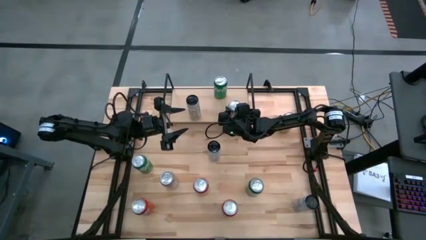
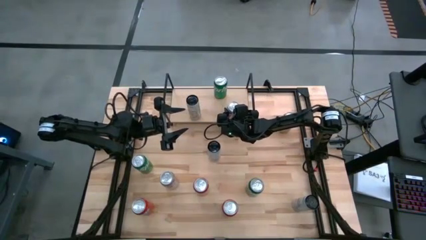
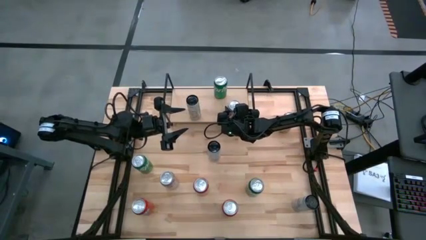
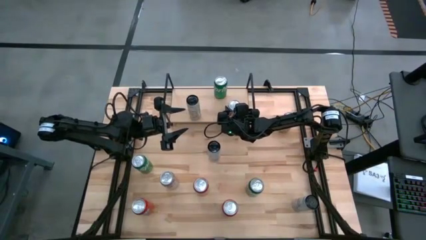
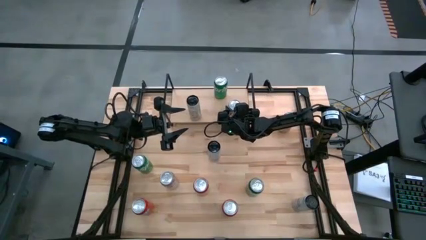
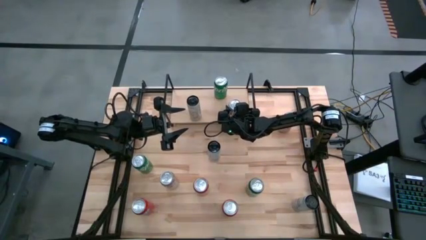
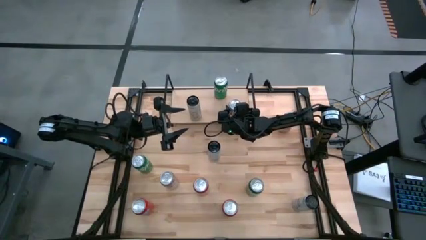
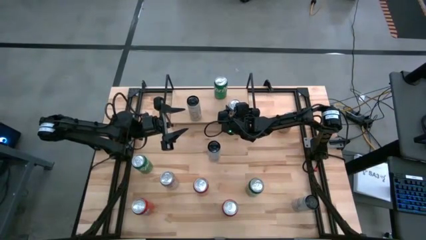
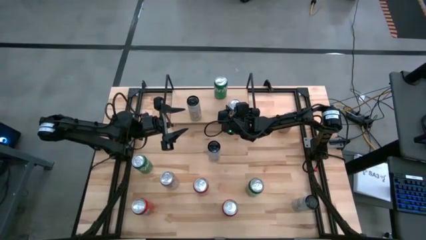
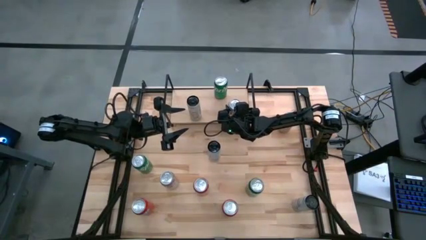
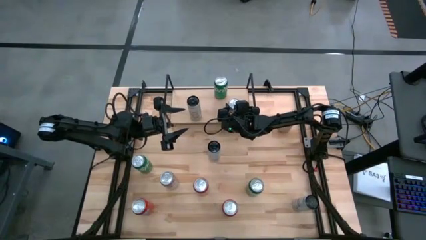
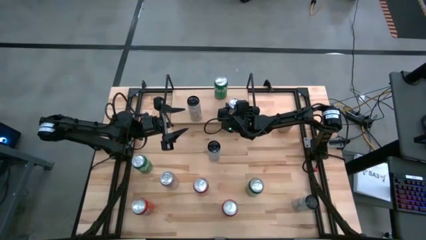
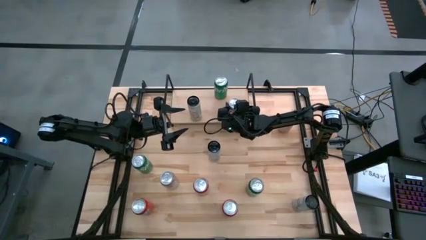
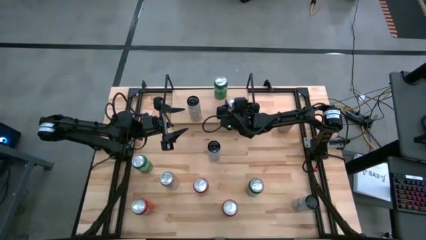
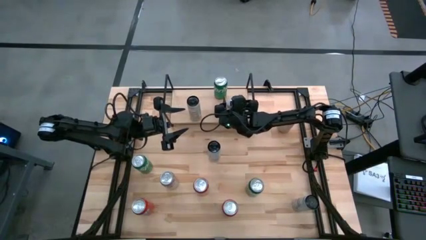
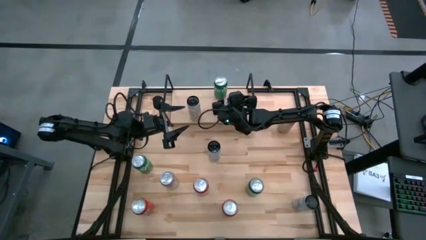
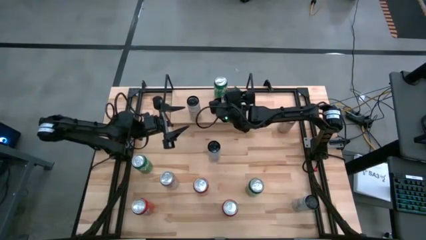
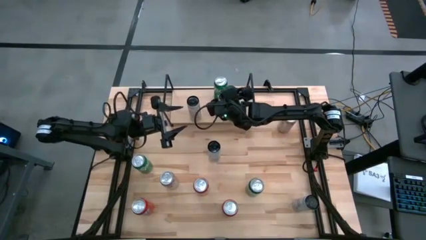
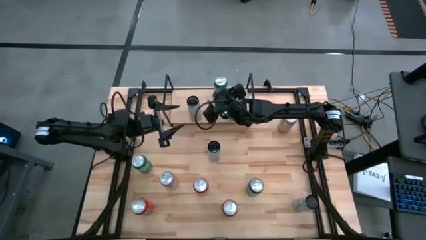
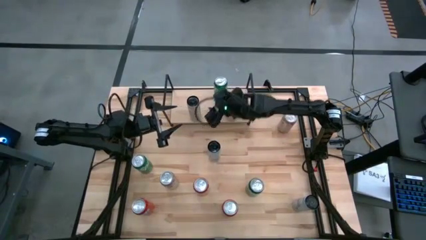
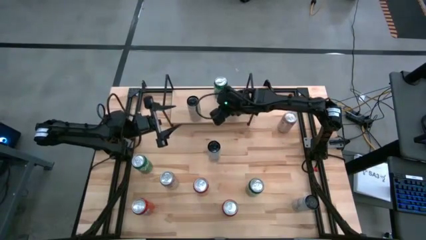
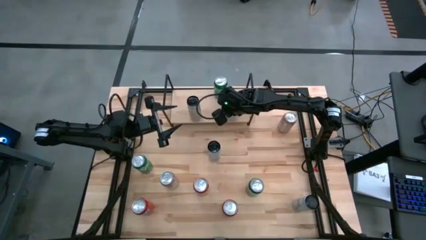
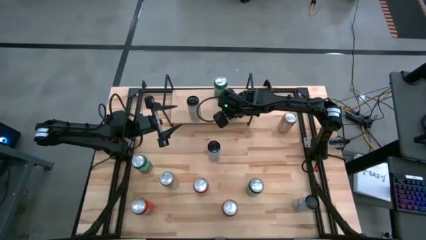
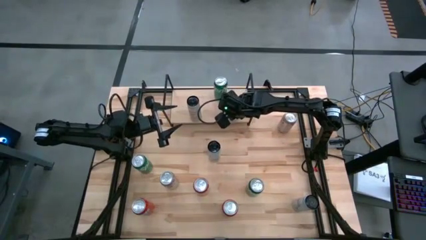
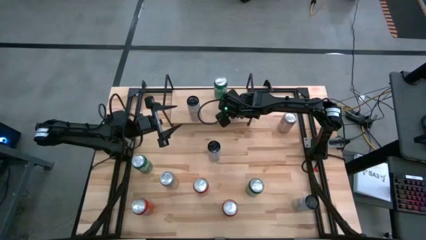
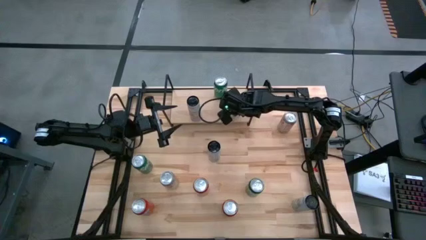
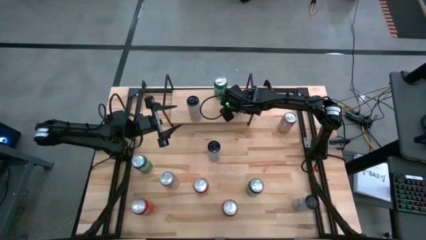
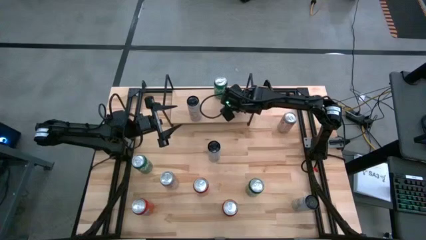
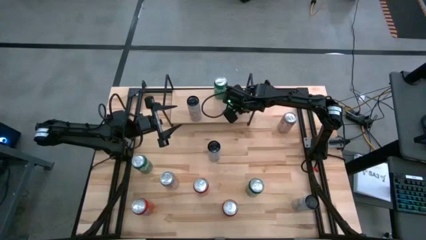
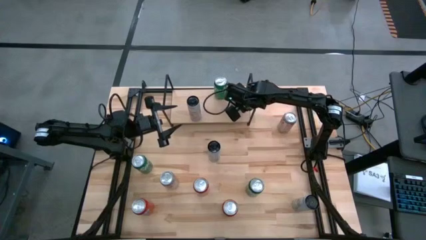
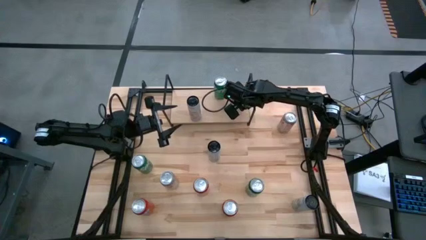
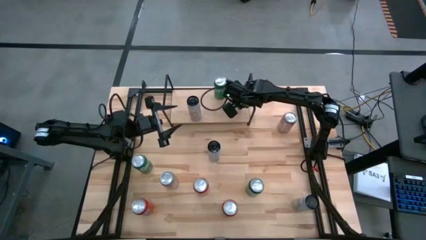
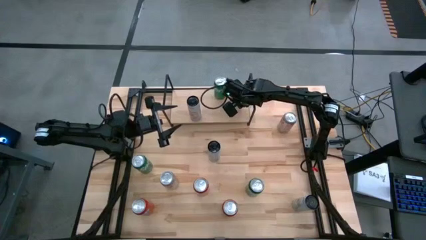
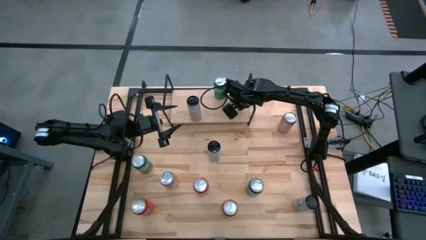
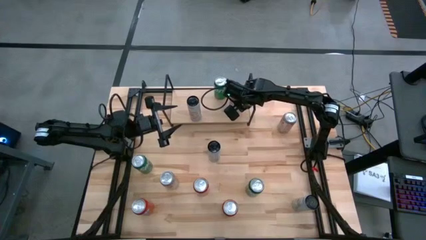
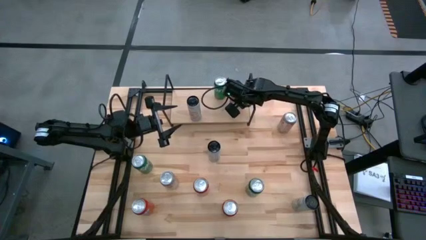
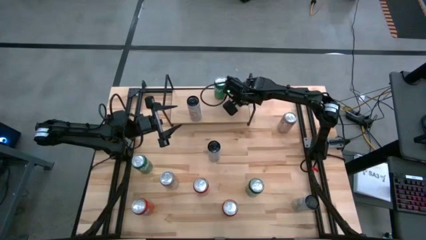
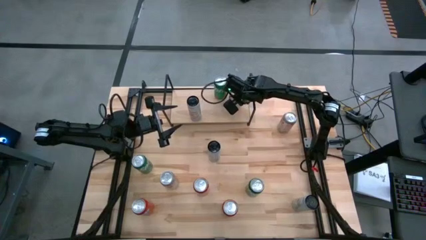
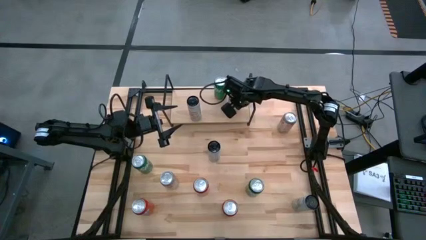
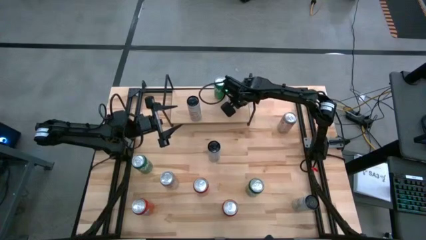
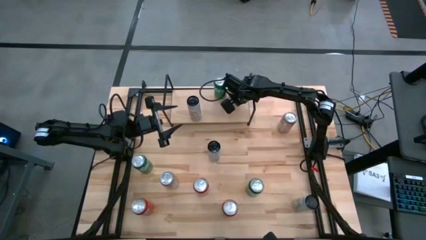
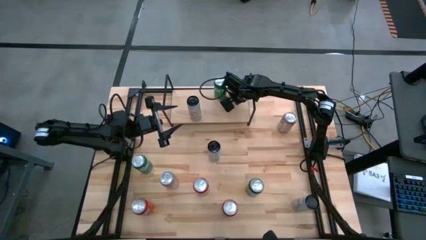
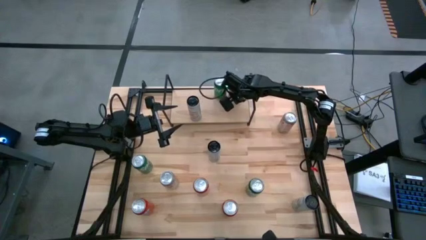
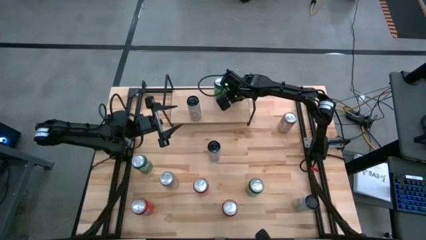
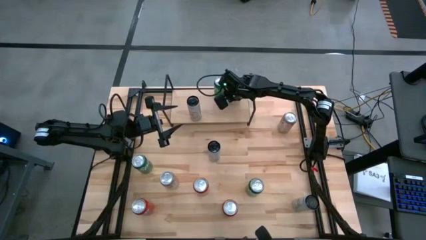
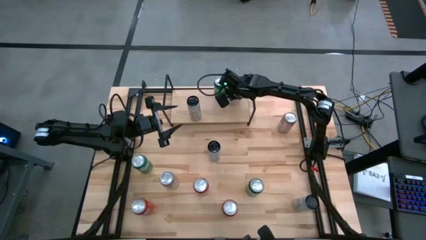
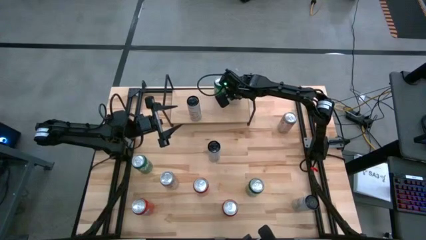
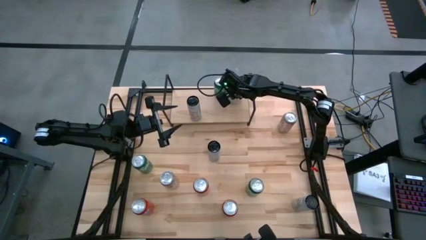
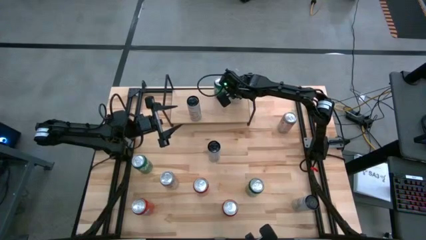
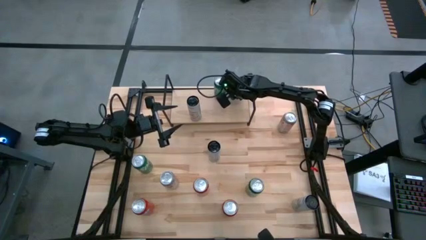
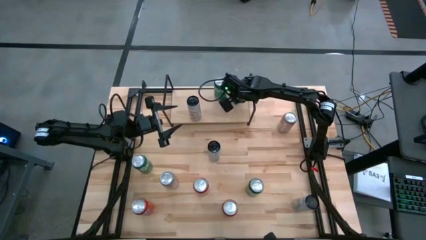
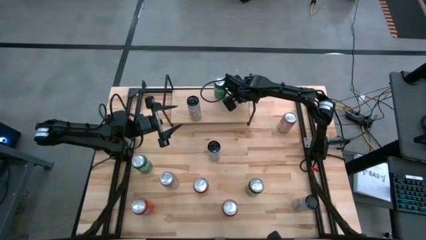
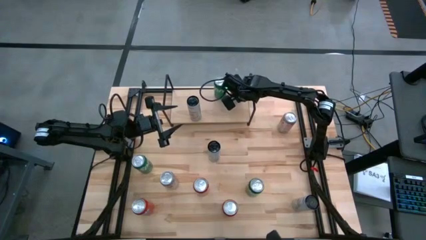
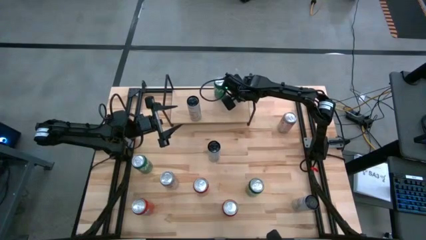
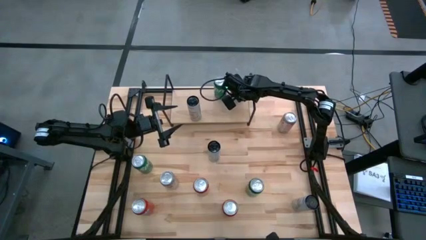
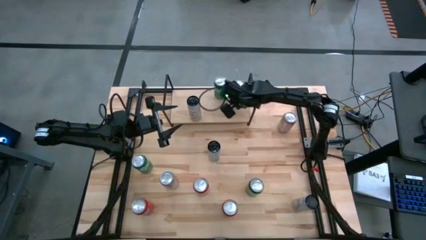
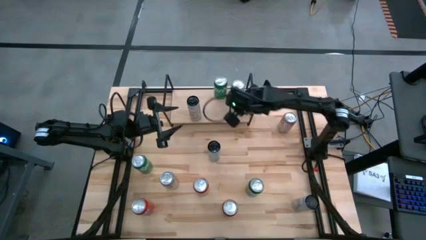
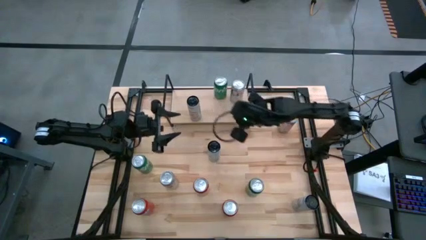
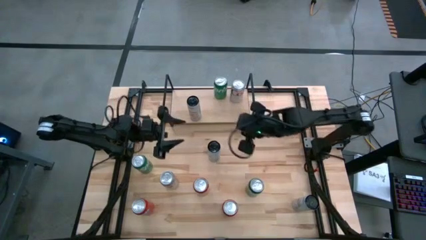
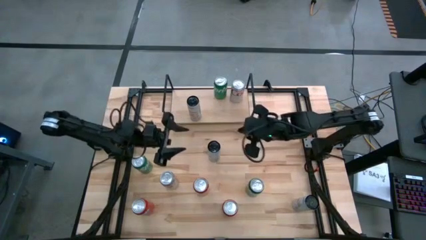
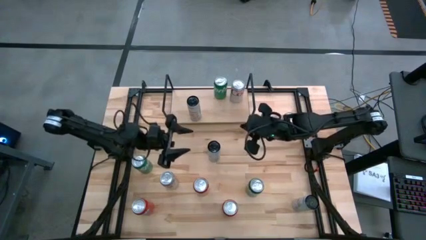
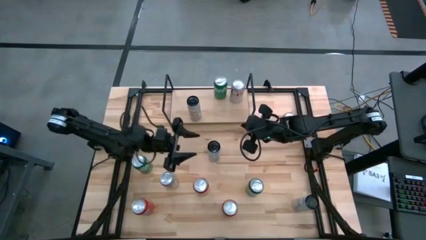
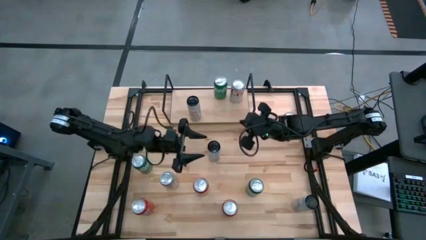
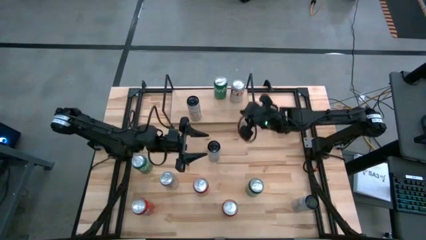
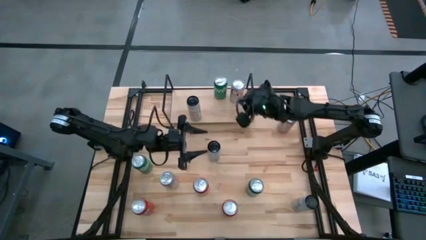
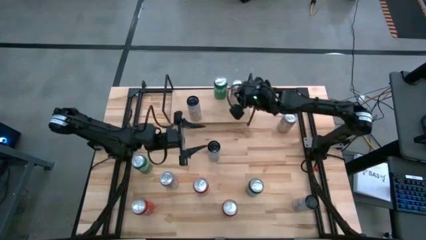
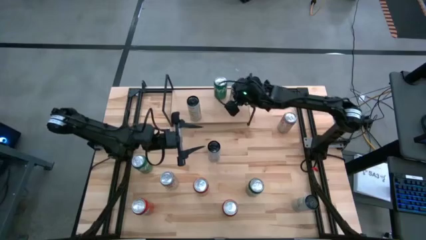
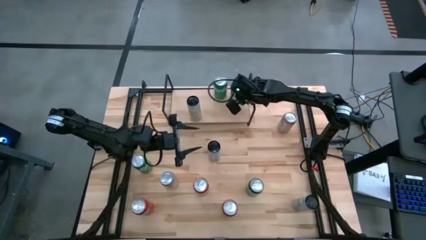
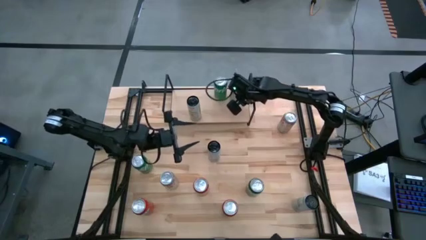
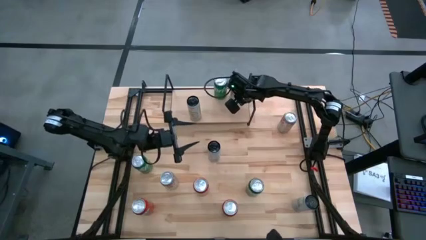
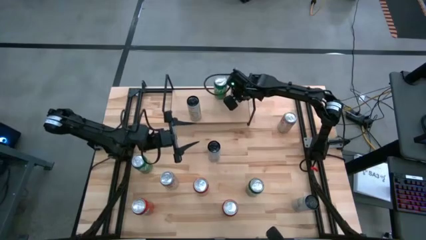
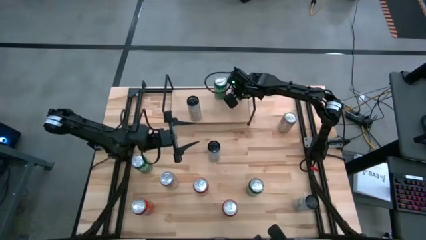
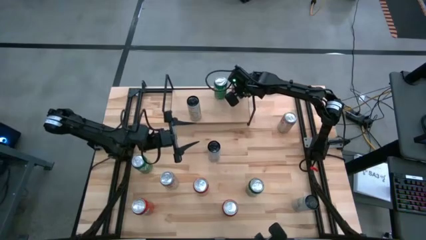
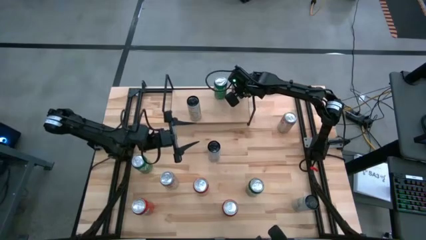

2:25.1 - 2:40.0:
Task: Sort soda cans
Put the middle red silver soda can on the shelf
